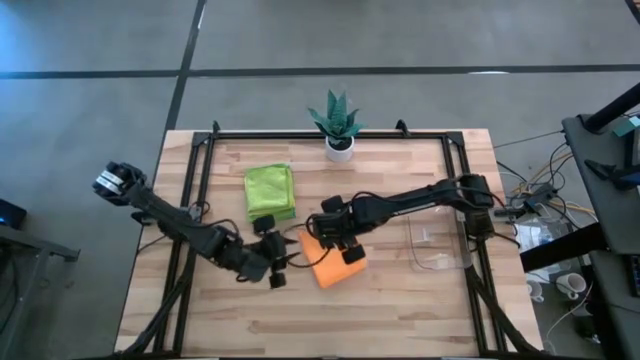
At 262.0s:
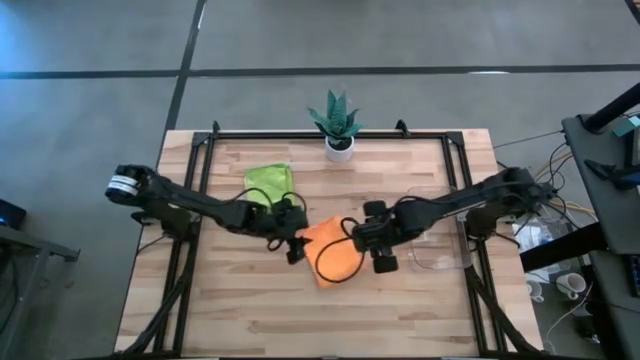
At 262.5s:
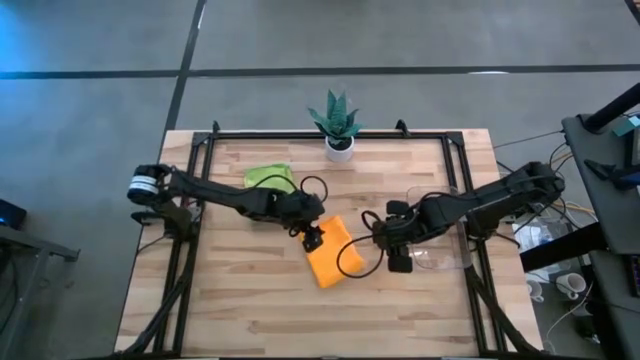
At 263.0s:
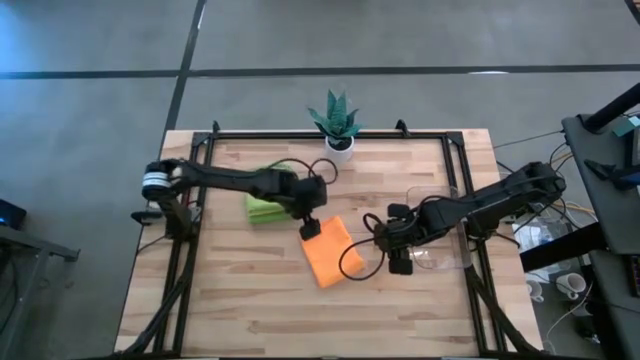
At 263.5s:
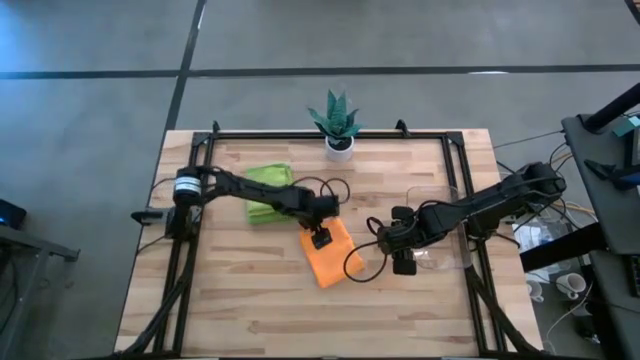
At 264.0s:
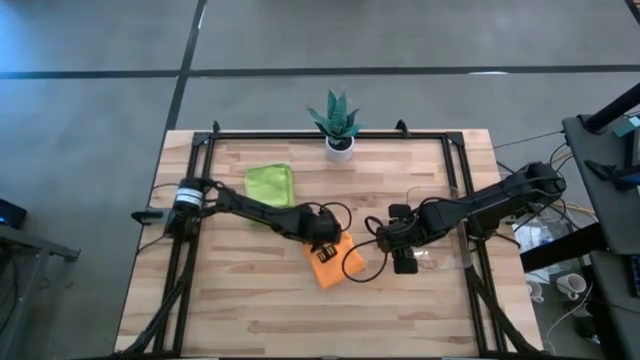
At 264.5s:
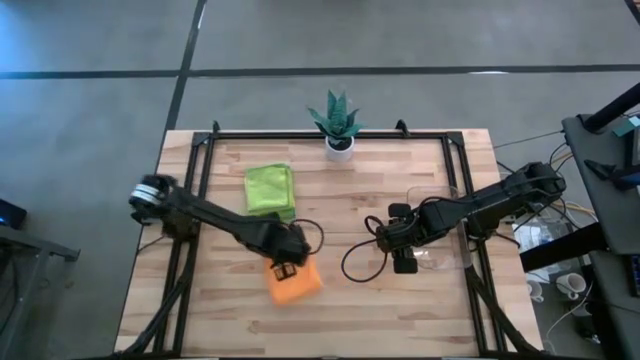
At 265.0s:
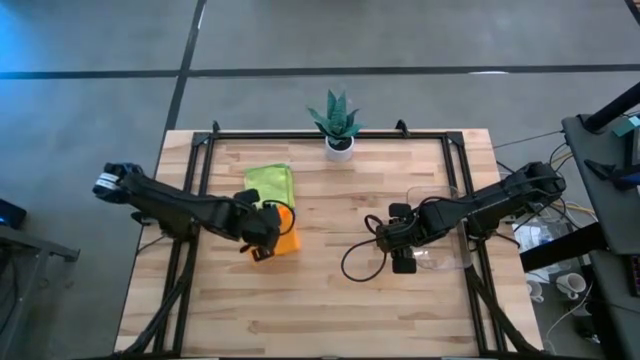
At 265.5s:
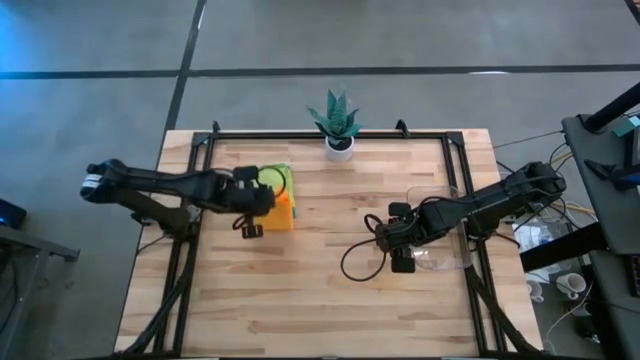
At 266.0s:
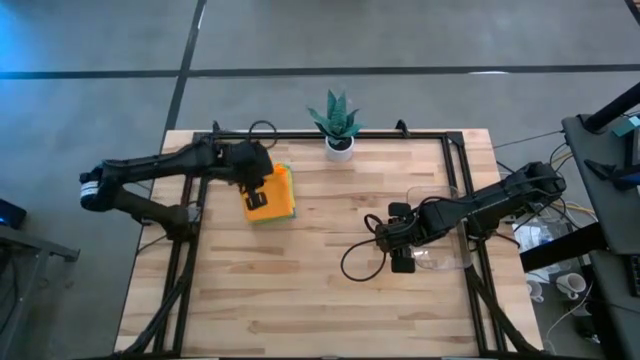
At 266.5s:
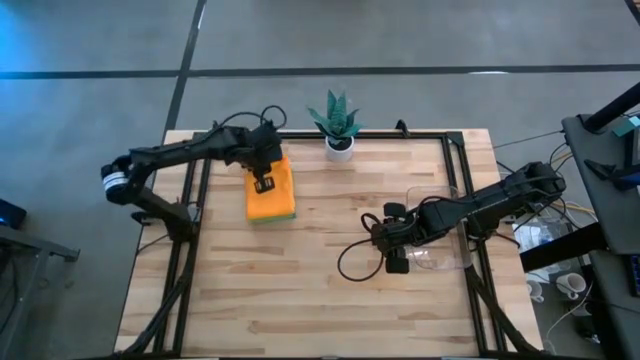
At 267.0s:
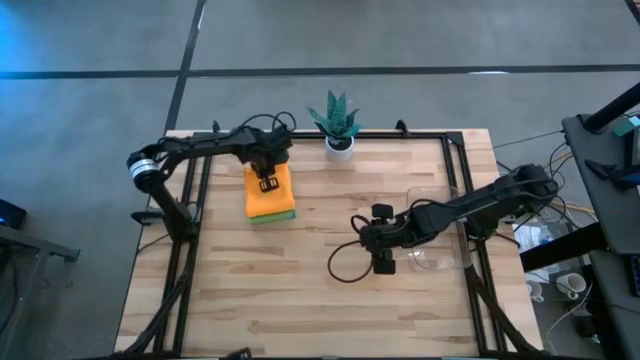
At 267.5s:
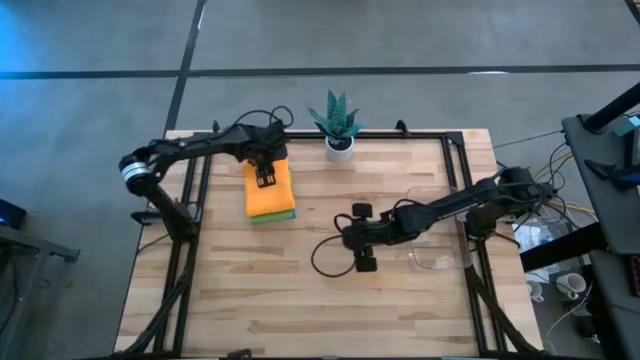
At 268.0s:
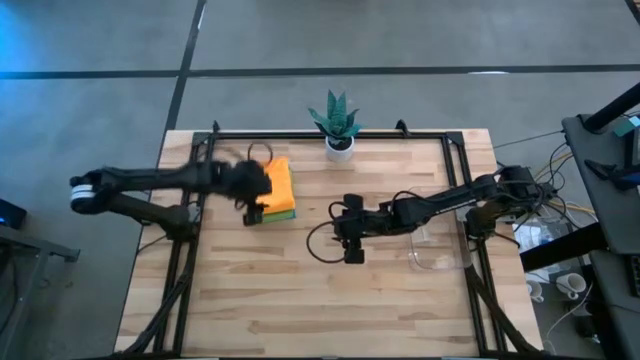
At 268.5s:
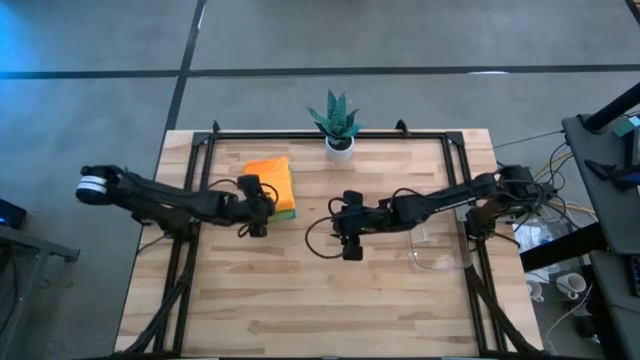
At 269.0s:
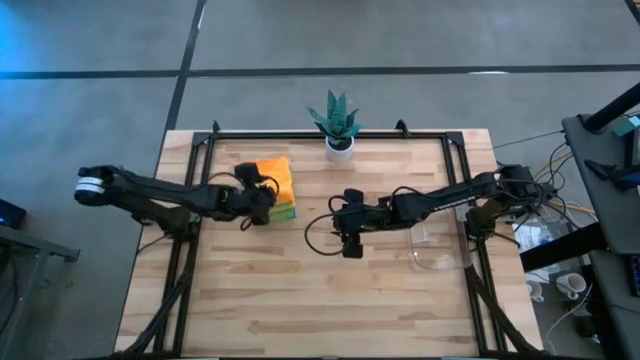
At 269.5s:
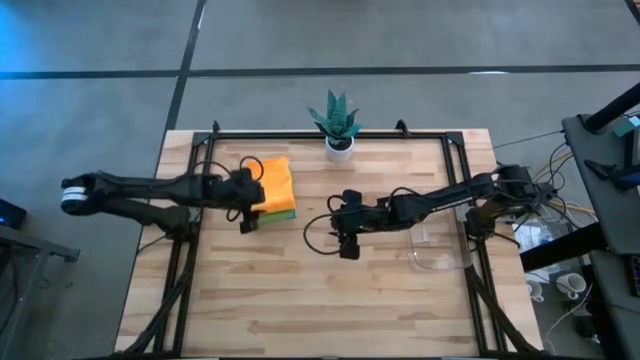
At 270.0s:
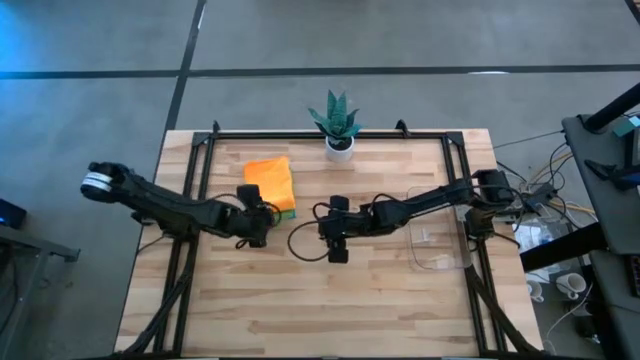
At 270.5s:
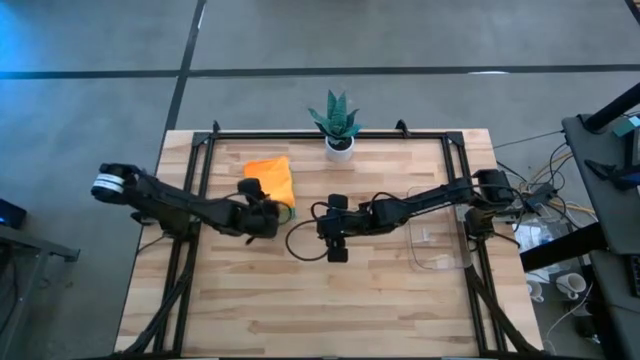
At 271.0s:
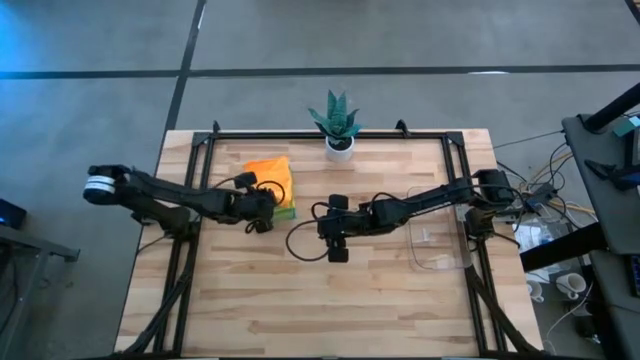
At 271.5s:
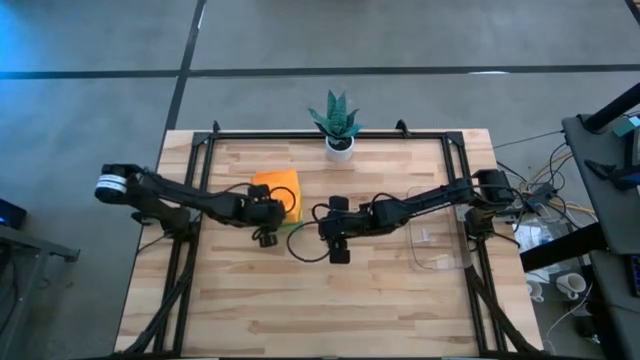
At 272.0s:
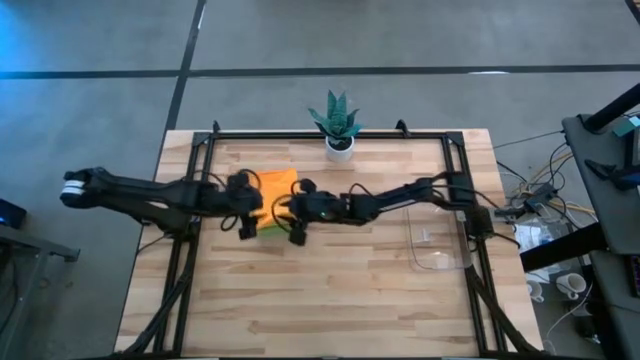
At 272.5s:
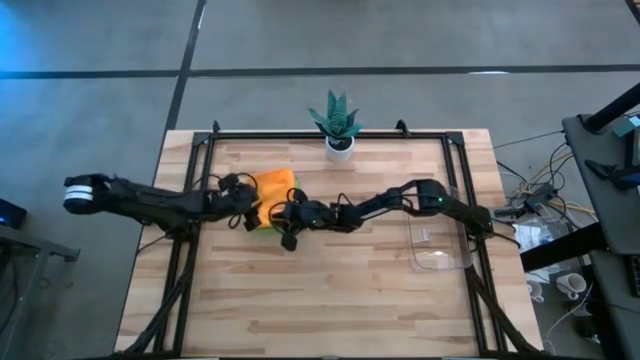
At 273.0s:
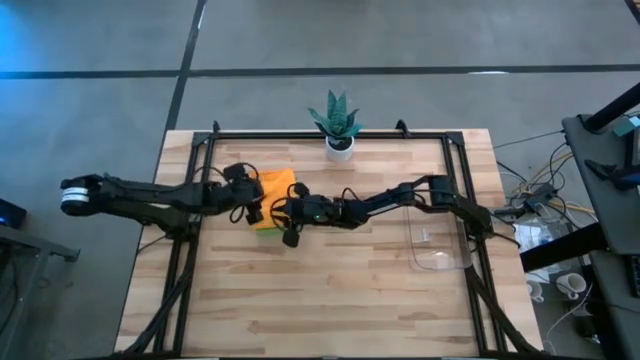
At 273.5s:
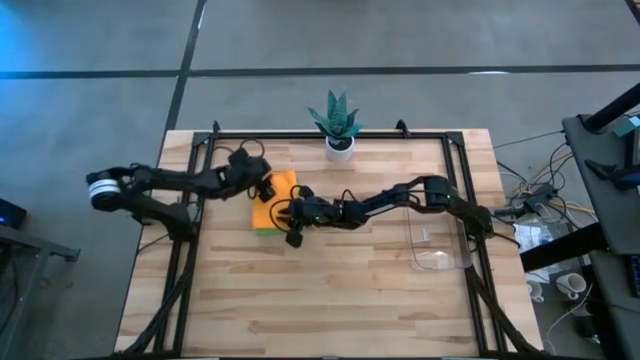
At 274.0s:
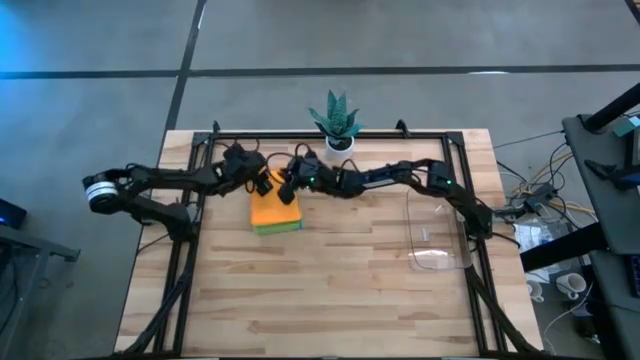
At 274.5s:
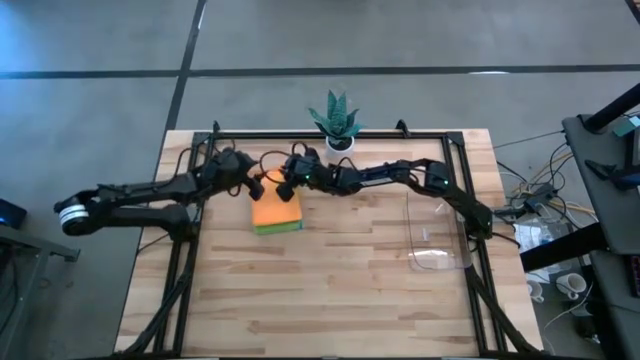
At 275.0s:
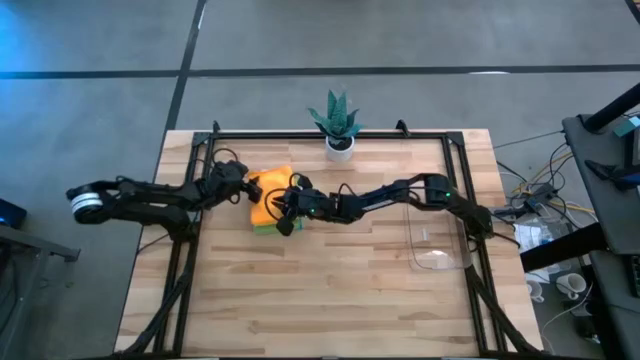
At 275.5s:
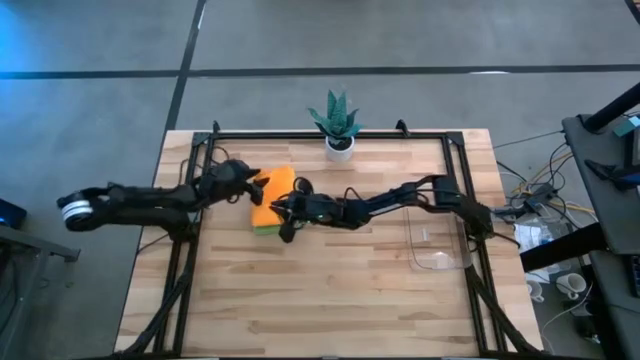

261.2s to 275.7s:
Task: Fold microfiber towels
Stack the orange towel on top of the light green towel

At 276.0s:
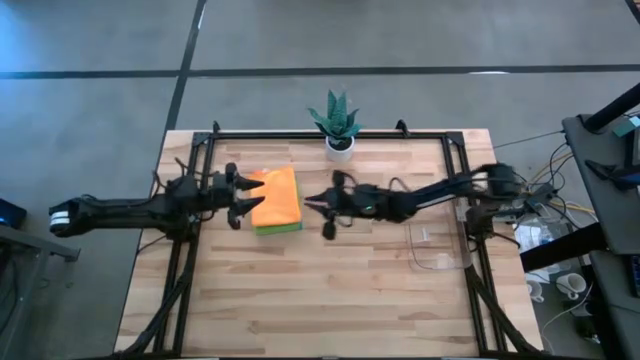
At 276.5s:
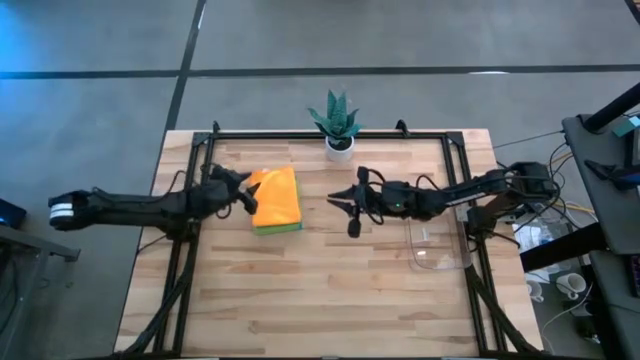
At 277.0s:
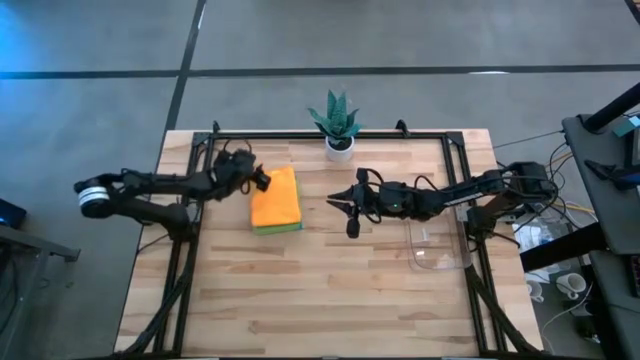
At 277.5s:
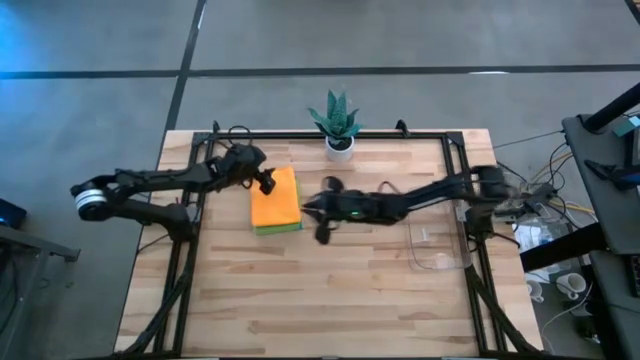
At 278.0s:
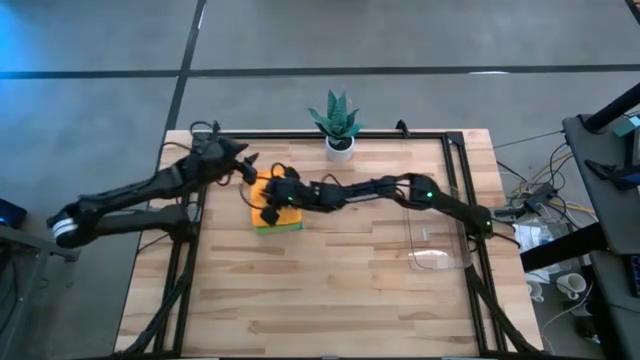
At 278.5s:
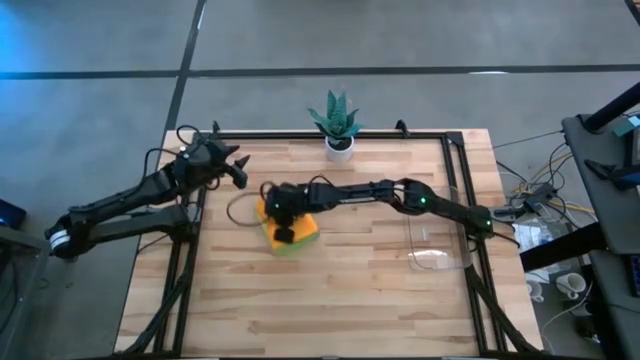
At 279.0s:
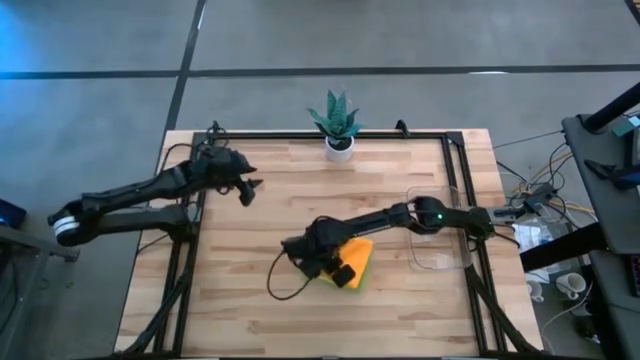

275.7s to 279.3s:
Move the colored stacked towels to the center of the table

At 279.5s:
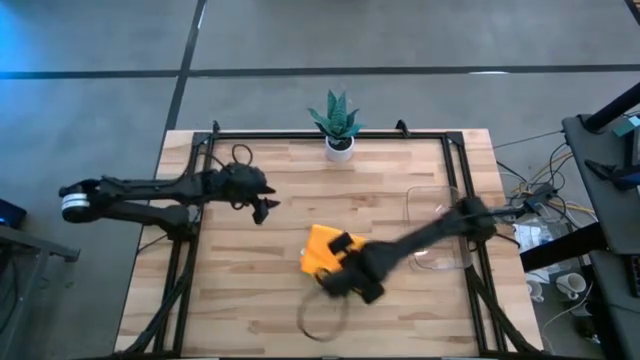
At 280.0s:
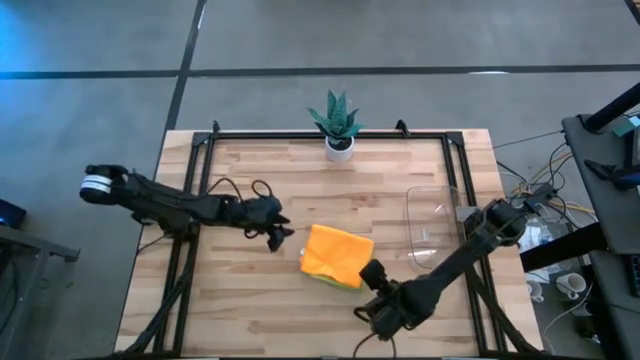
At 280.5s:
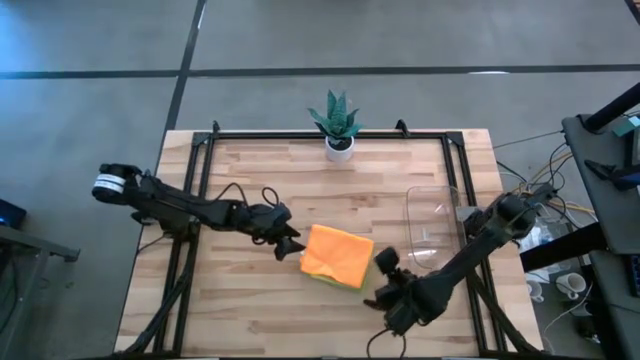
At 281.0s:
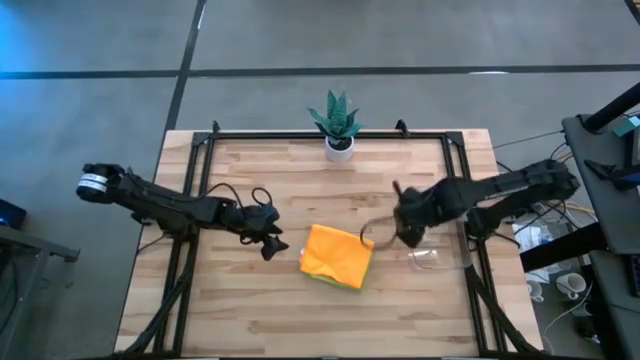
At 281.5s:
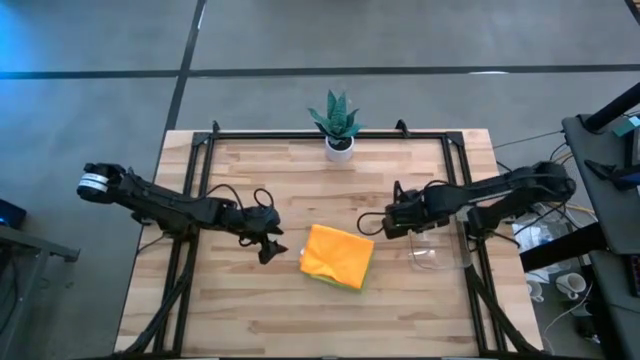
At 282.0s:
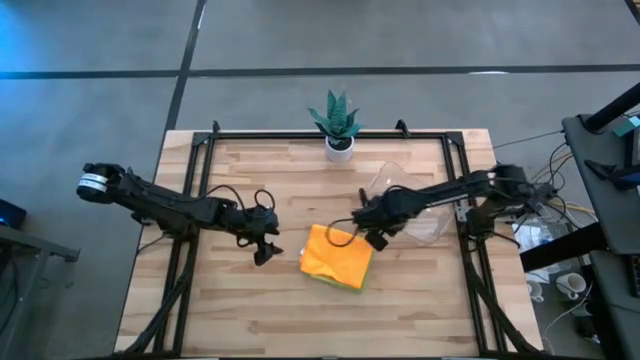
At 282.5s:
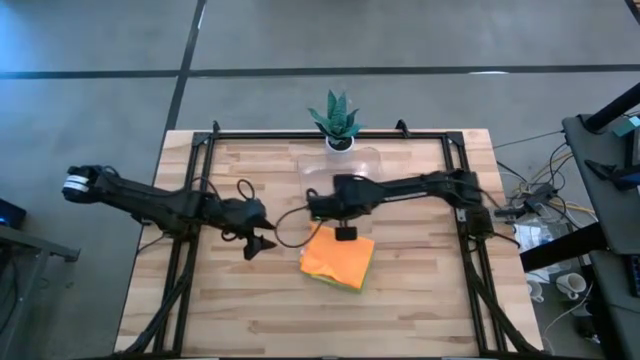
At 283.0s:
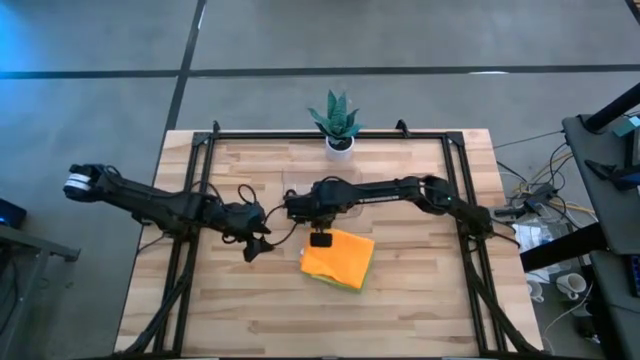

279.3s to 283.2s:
Move the bin to the top of the table
